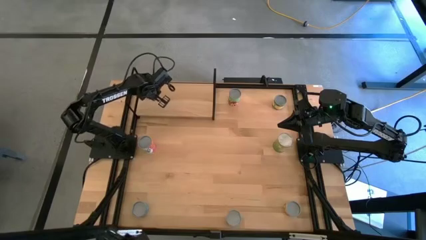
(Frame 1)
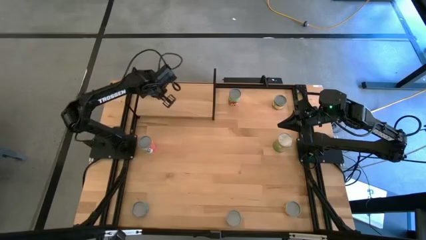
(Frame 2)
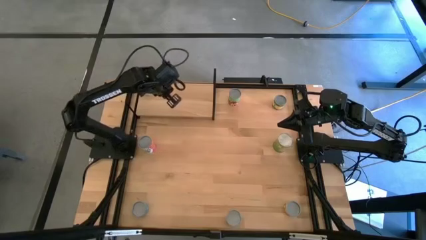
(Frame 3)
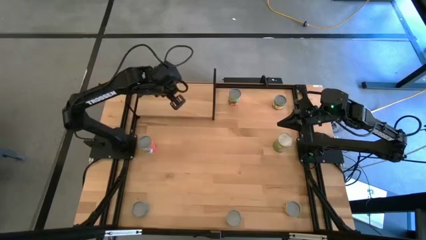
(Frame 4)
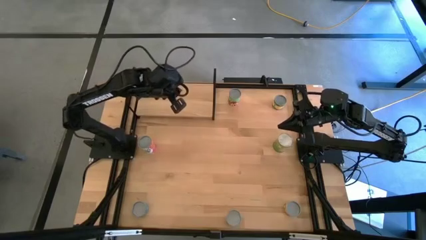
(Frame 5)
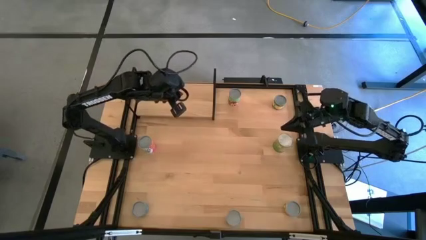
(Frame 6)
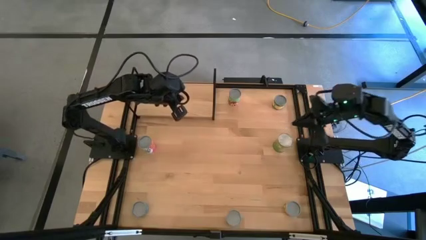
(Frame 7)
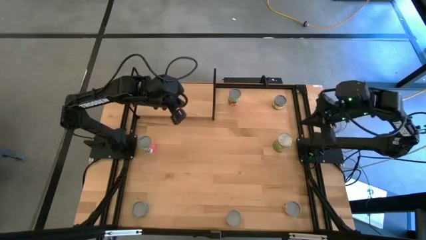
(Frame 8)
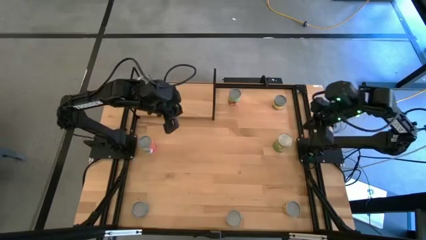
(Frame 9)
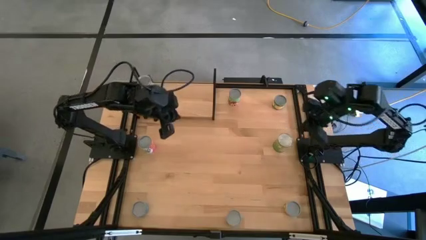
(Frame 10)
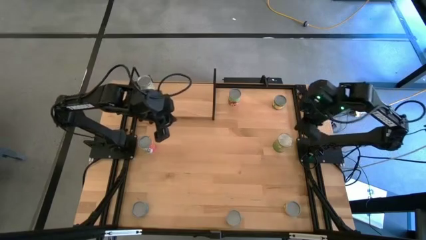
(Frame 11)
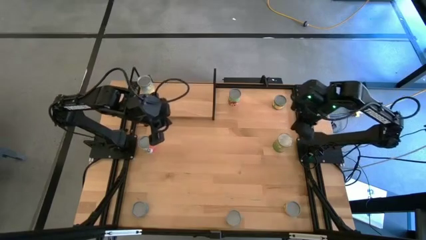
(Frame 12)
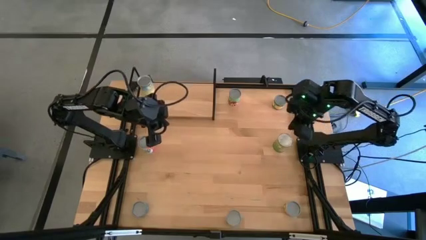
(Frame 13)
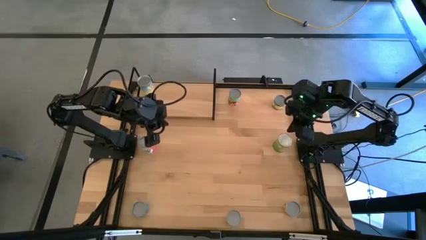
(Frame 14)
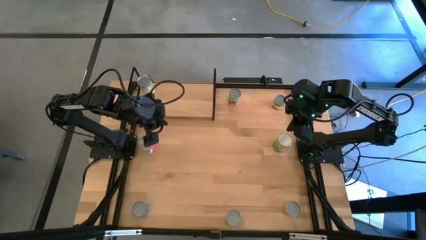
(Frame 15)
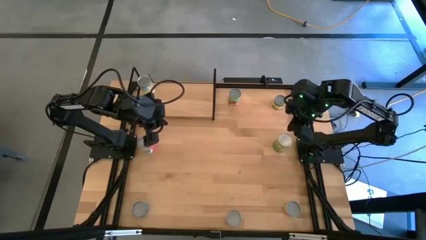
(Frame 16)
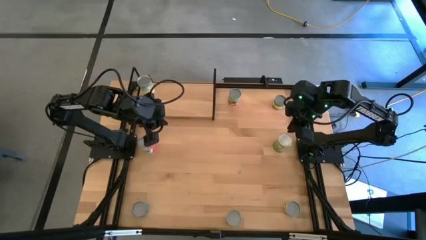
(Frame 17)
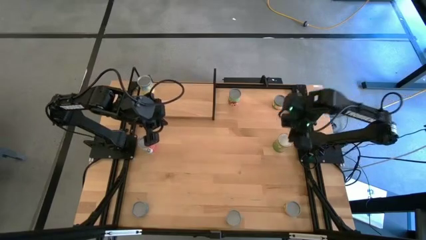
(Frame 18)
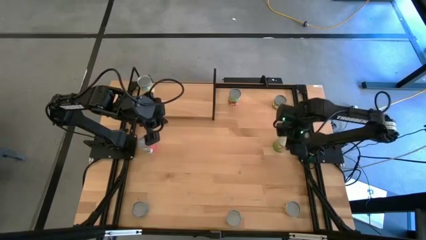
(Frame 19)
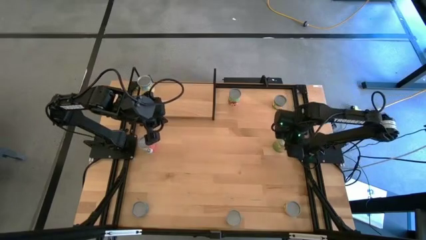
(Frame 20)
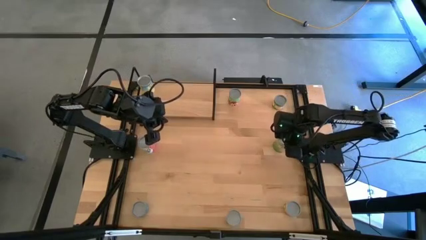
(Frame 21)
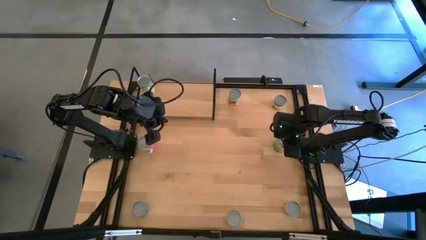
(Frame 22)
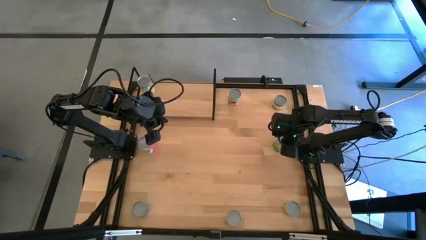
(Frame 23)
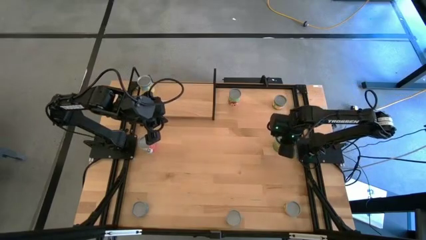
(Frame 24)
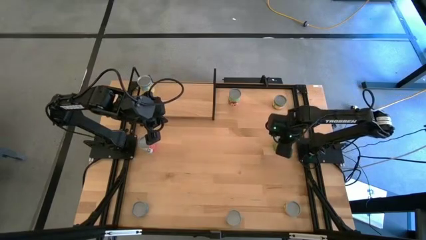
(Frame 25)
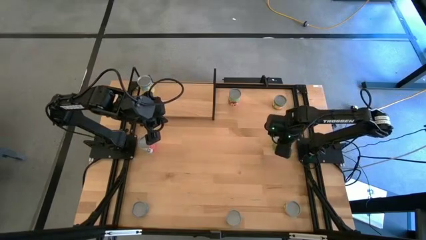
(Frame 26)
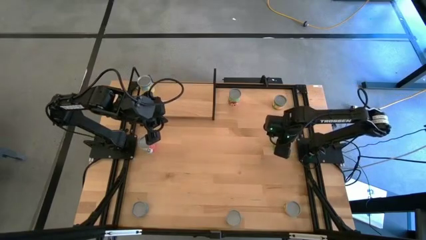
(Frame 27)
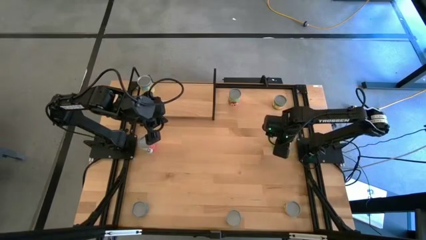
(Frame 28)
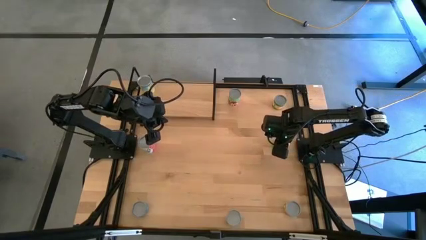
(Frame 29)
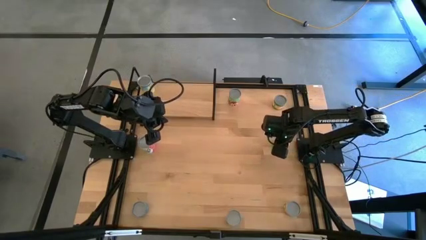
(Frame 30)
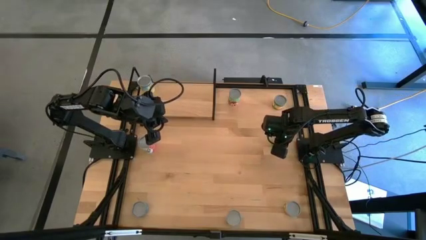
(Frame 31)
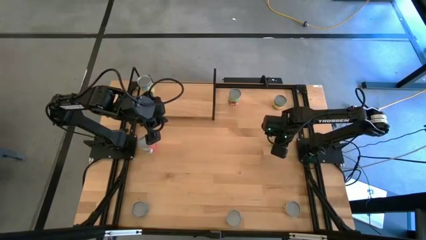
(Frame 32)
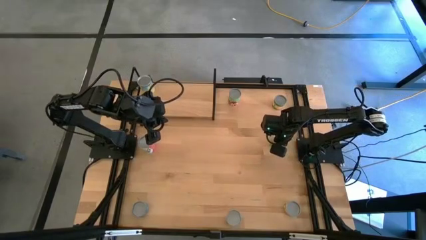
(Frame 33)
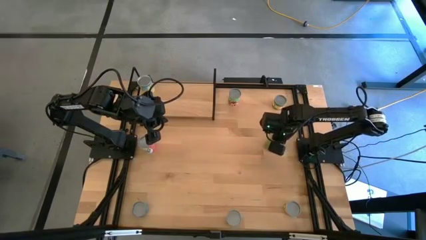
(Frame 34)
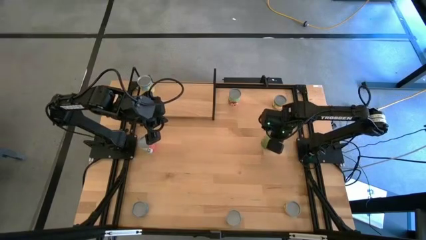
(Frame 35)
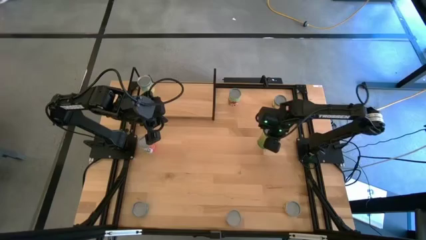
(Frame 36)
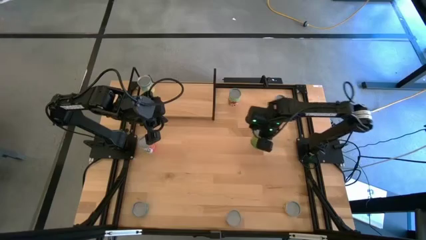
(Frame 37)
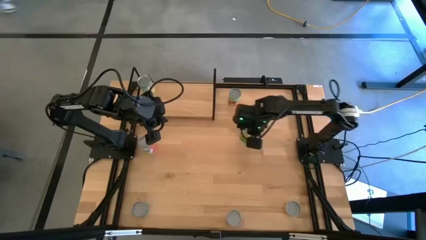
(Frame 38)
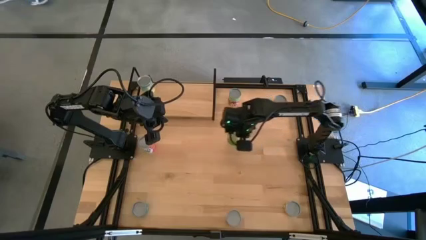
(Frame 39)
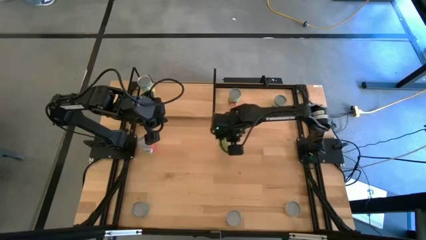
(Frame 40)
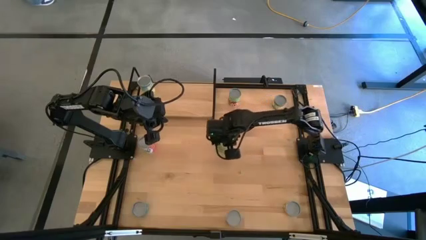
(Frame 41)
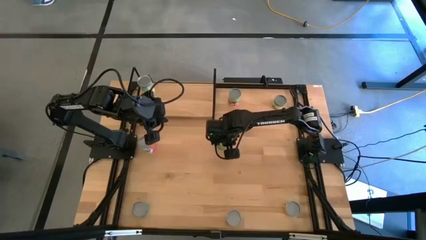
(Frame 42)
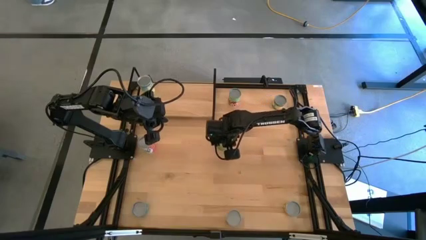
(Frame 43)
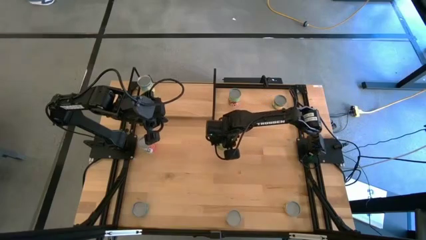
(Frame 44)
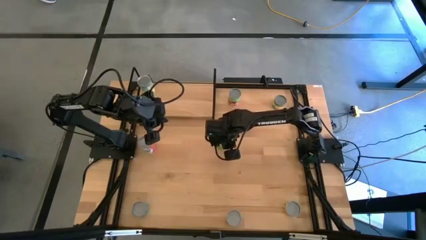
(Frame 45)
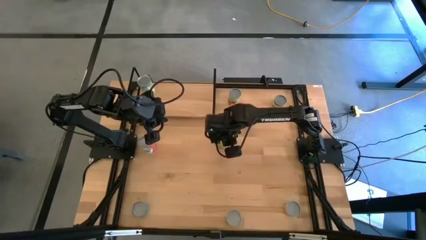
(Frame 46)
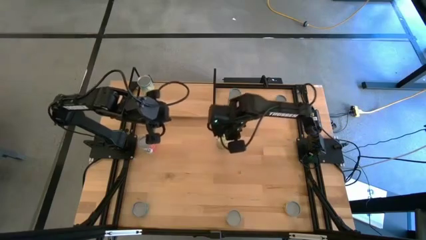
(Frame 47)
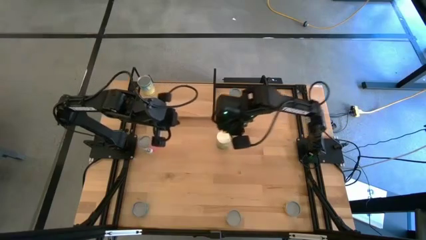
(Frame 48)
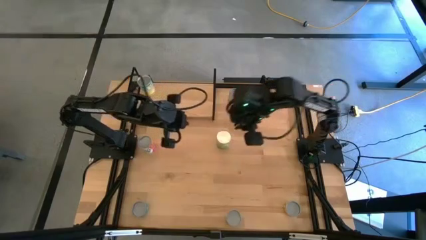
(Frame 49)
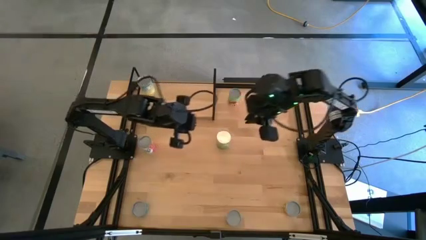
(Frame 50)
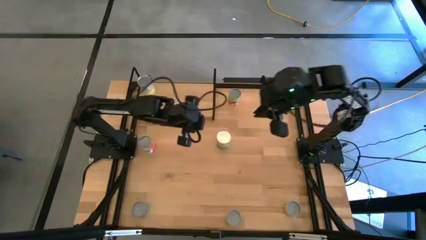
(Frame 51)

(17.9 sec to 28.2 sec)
Task: Pick and place cans onto a shelf
Put the canned orange on the shelf

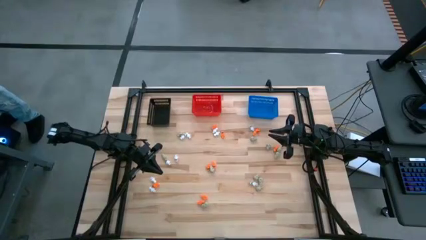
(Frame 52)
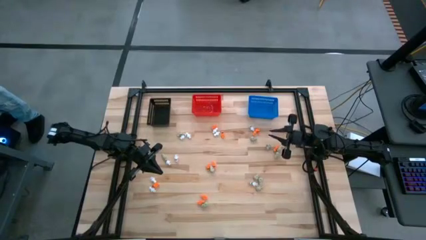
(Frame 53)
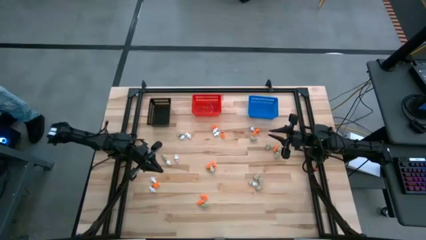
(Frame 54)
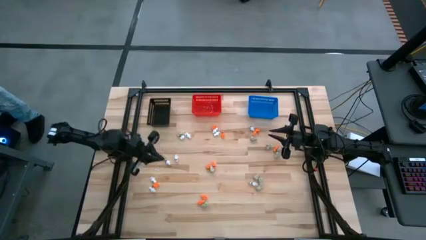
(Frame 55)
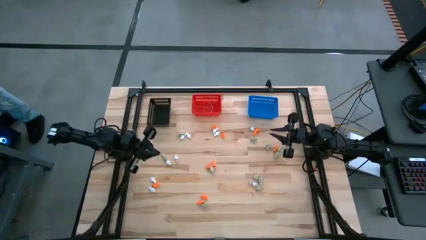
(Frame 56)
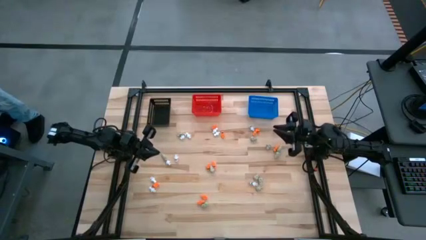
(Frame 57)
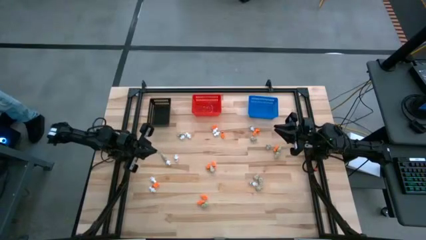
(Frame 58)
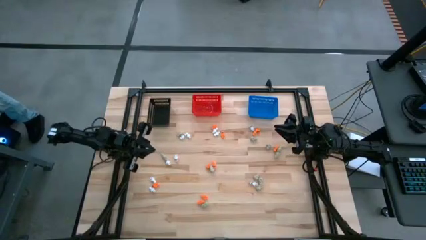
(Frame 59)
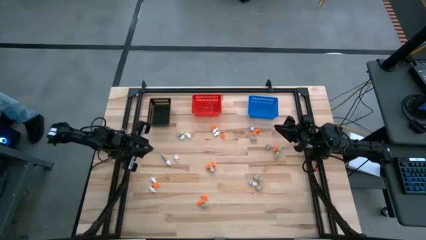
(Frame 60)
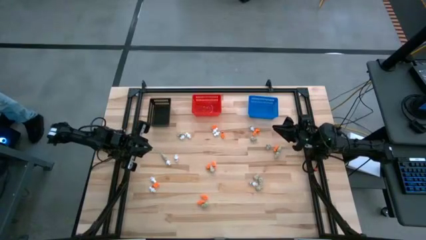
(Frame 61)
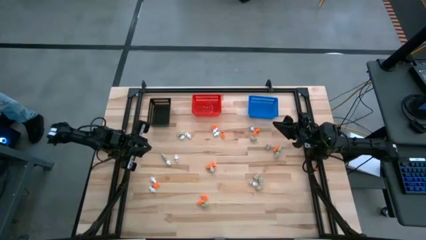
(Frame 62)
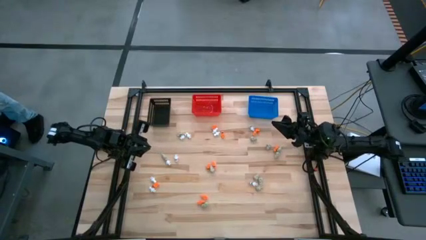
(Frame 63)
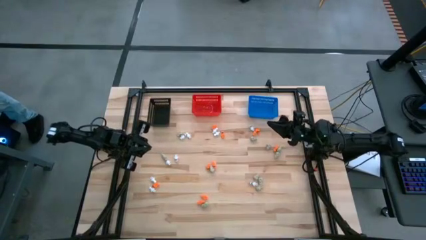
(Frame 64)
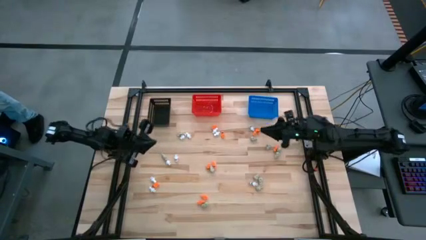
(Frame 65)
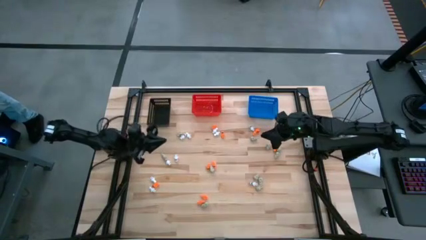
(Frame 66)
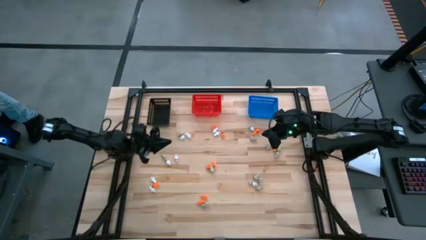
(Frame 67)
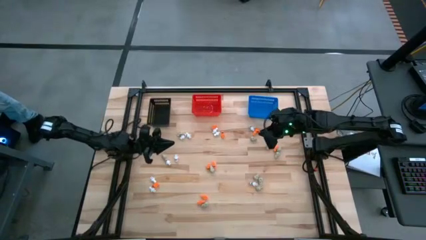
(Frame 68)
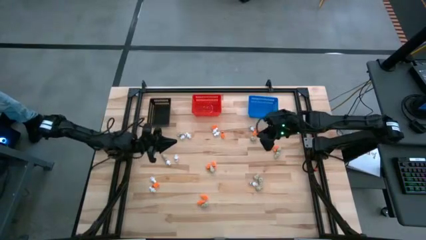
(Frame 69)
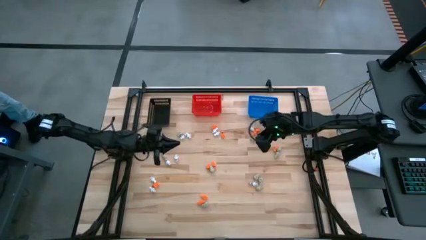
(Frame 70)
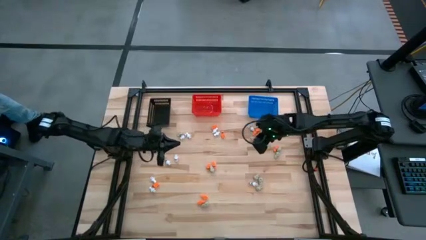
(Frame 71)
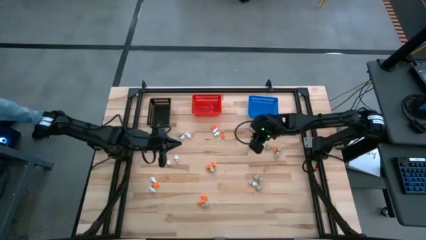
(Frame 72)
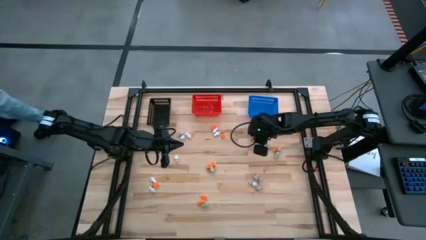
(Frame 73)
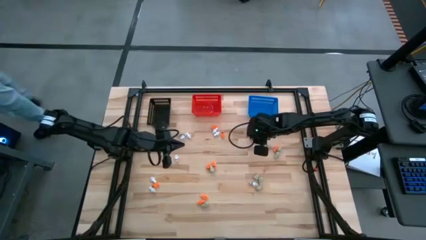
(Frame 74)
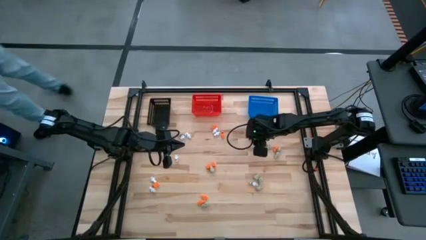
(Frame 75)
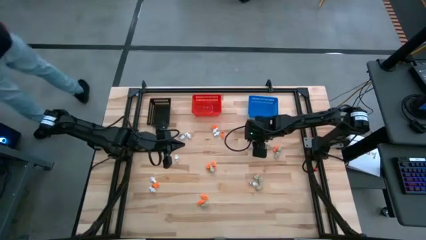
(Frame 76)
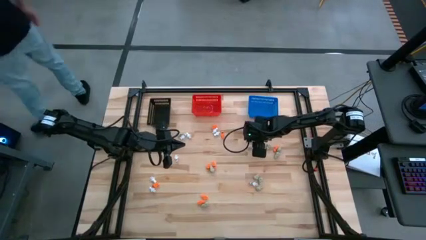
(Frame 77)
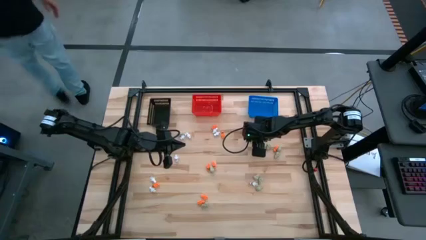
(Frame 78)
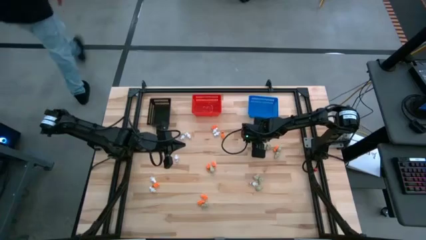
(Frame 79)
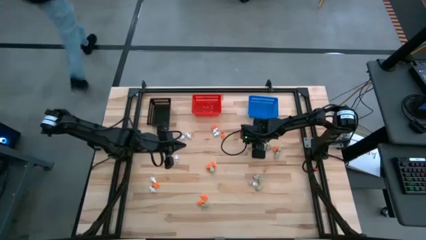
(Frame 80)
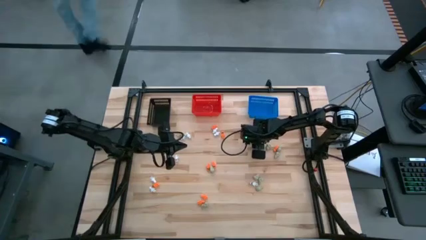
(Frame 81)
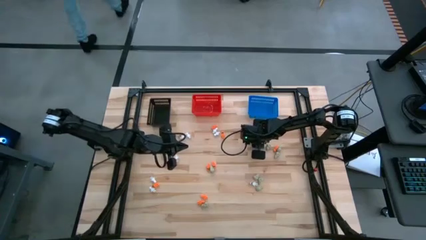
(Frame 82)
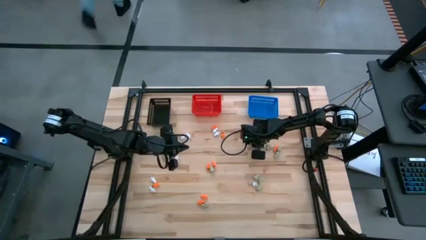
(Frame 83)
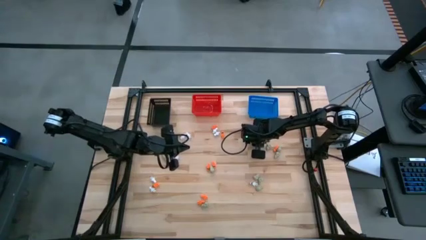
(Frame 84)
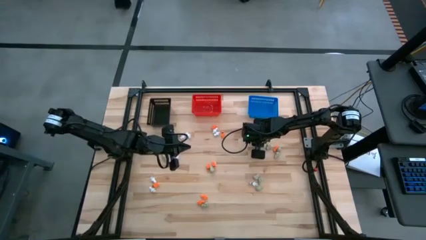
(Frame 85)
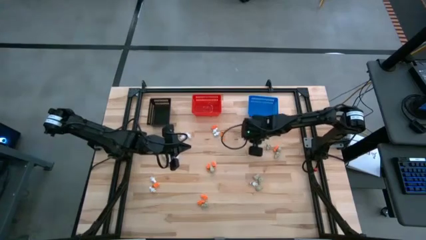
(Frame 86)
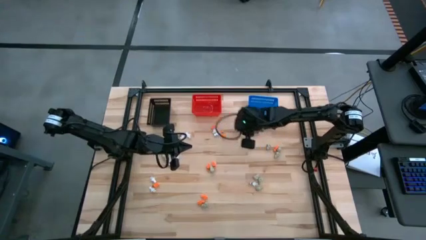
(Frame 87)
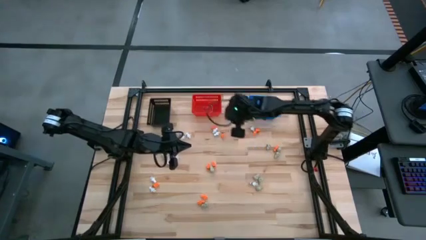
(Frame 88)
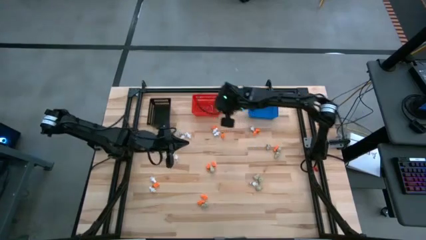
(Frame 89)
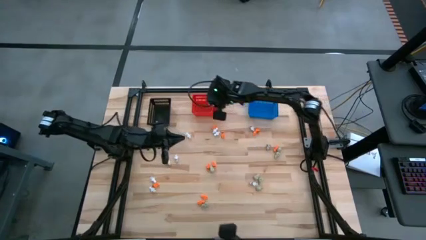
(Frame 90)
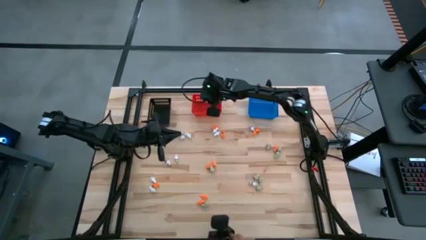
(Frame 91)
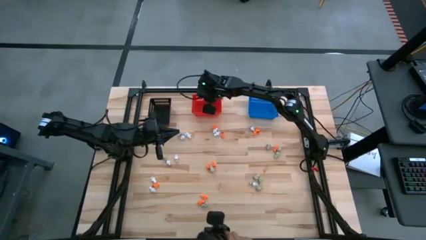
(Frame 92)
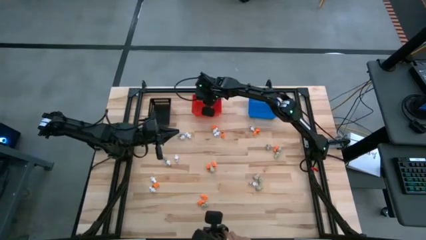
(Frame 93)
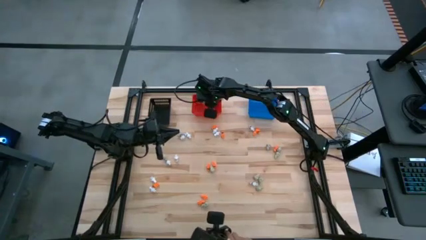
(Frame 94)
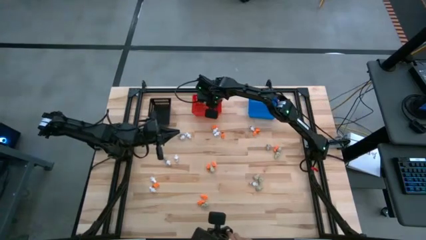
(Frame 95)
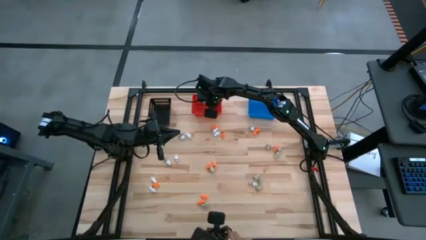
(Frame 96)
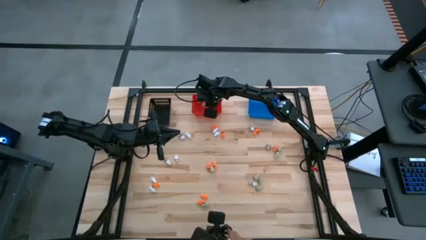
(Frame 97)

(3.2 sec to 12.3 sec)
Task: Sort Halloween decoration
Put the white skull toy into the red bin
